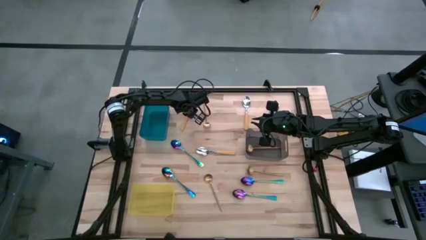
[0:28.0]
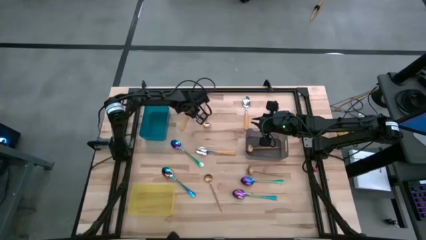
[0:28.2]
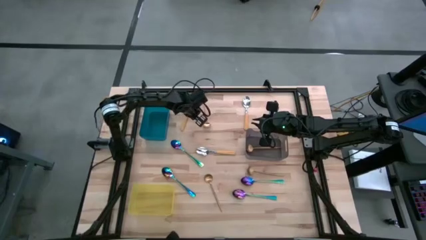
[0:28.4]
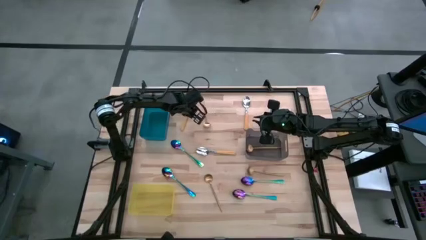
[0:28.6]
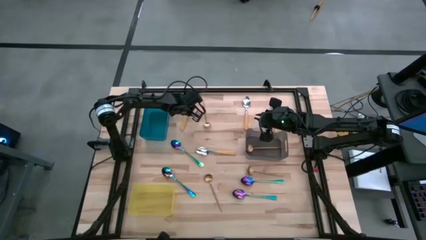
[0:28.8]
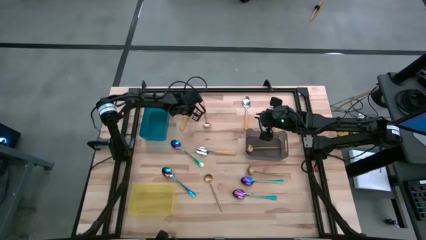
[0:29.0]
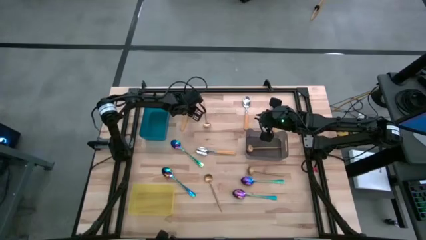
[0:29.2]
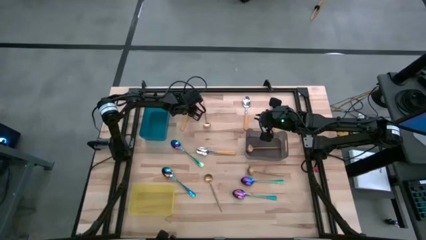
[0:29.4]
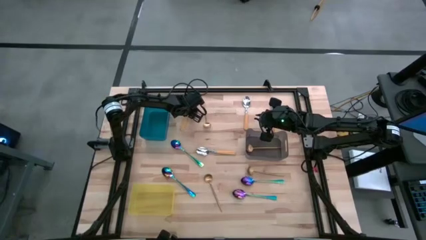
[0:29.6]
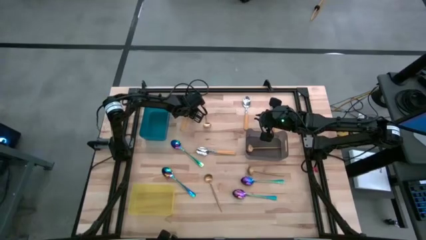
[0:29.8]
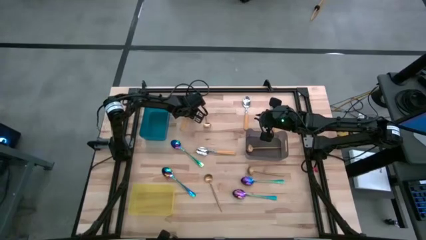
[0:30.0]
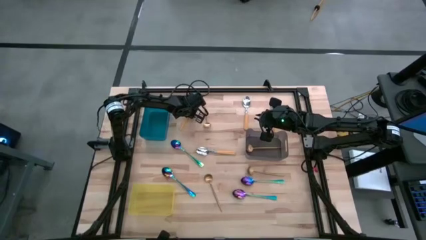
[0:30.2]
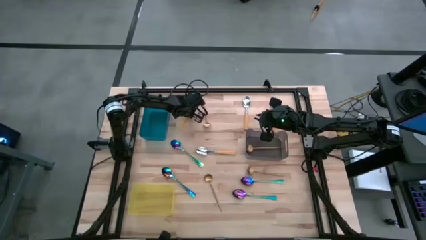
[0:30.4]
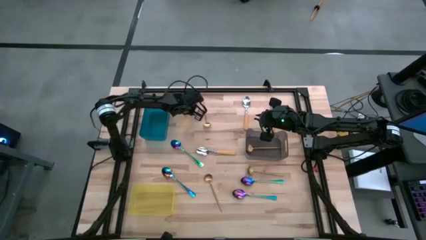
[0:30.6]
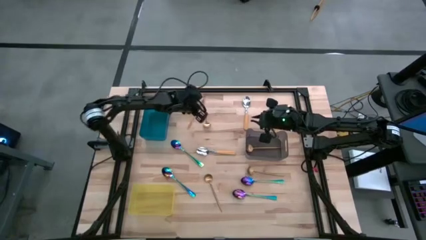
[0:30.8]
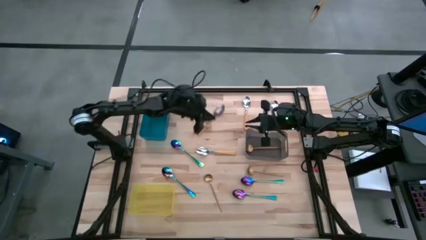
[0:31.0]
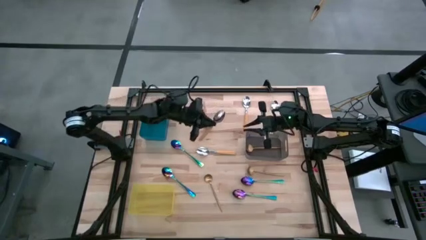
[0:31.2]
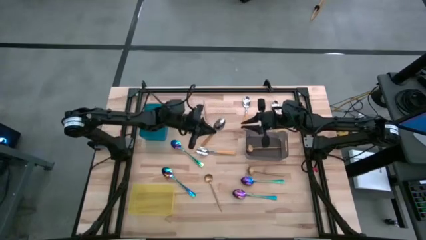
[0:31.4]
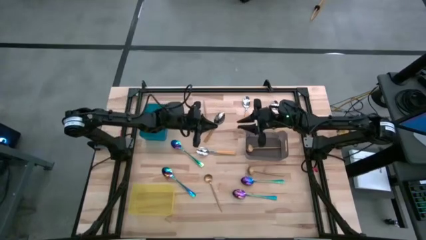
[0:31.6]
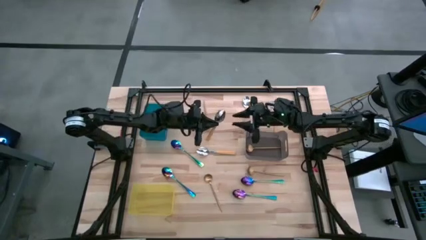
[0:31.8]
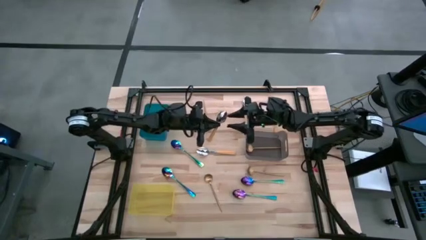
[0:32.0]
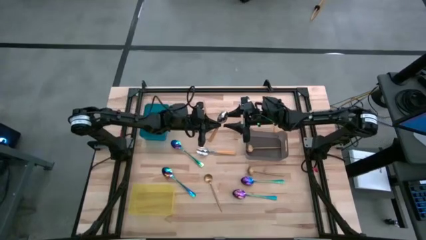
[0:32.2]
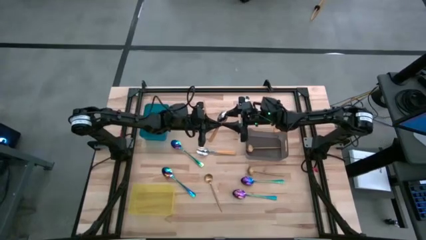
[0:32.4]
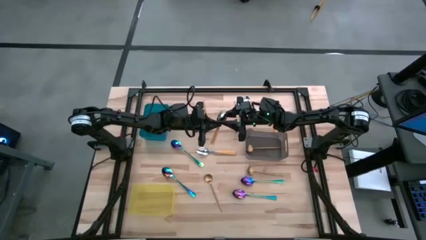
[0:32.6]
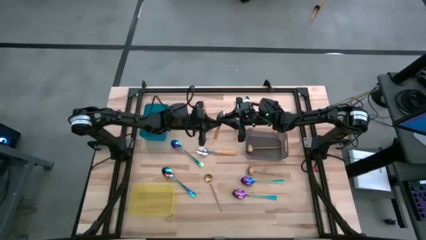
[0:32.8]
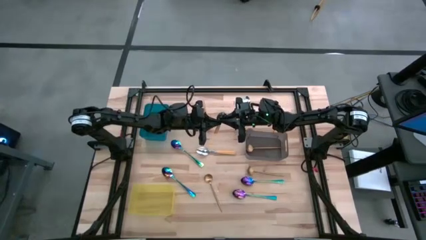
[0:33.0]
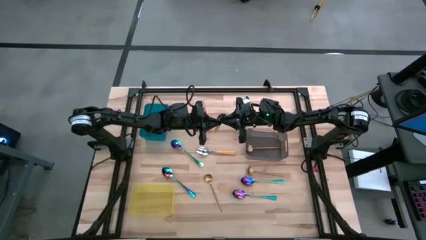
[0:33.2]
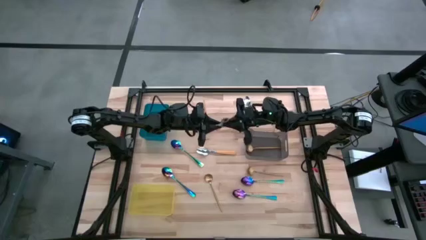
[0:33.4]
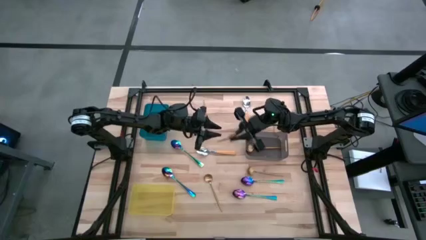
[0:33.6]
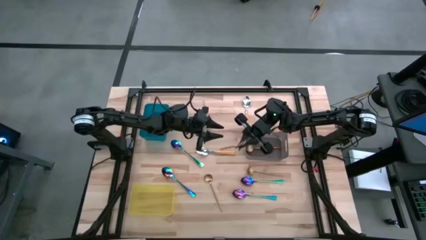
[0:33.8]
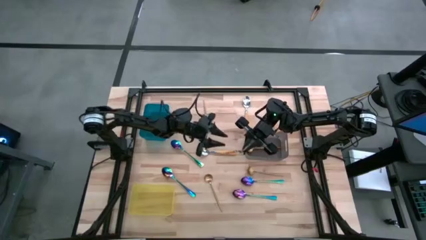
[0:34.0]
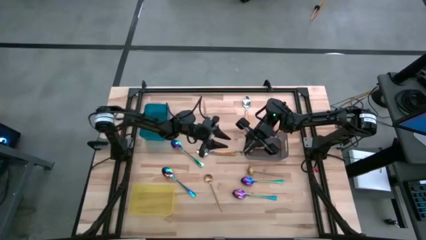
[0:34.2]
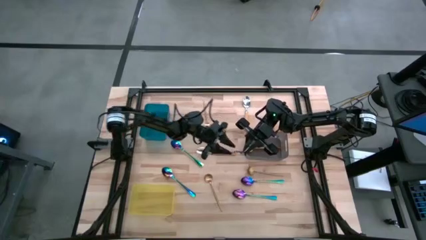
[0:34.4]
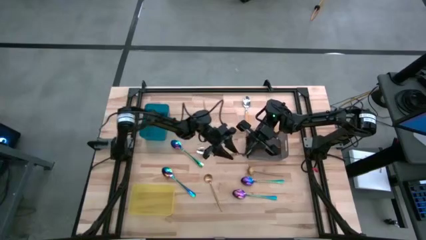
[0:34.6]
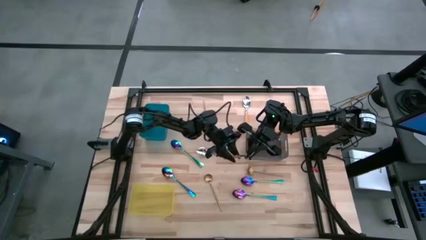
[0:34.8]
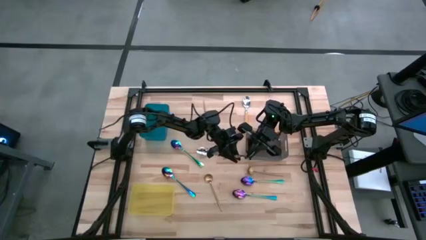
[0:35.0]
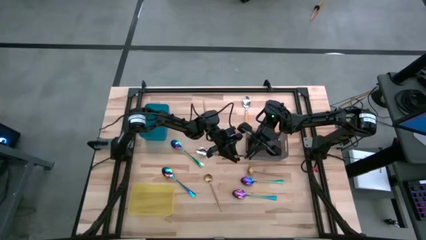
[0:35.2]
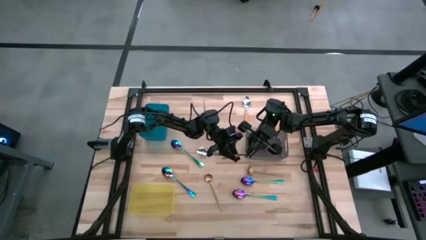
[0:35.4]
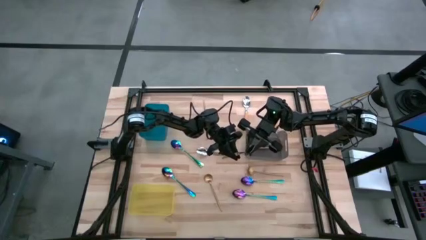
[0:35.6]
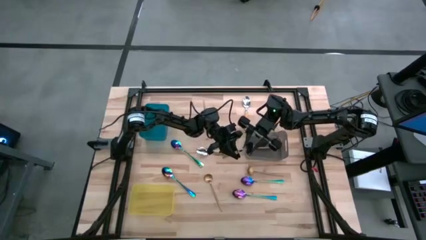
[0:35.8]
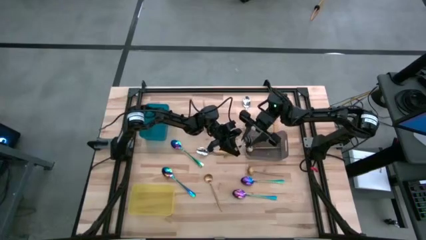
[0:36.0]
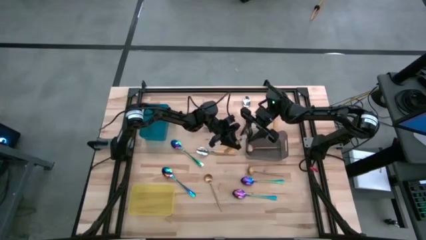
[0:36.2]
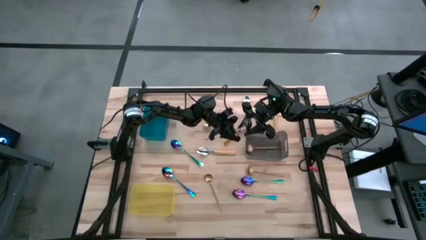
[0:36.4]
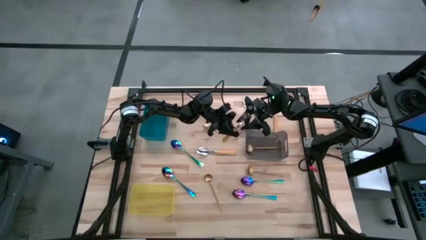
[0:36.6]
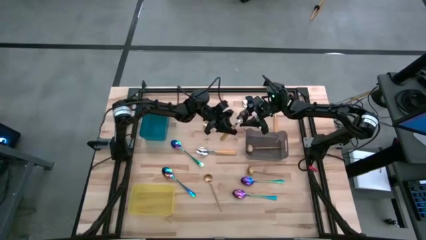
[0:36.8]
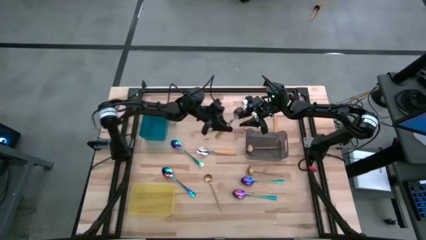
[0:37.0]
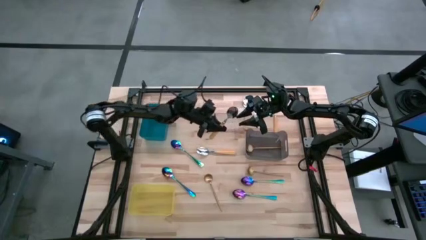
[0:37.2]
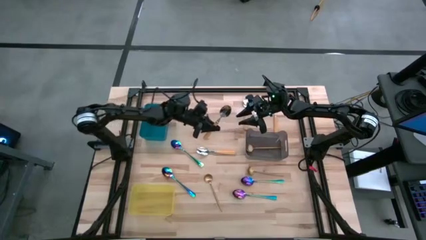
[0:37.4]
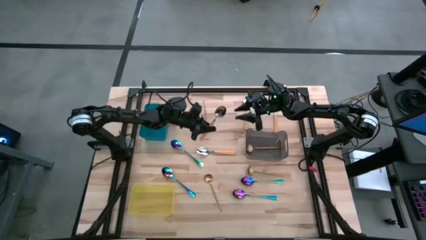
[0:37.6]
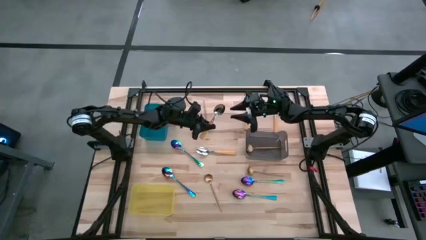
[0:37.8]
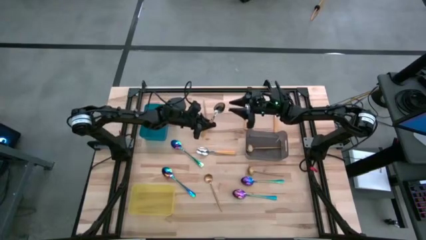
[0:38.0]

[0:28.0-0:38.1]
Task: Sort silverware by color (type)
Put the yellow spoon into the yellow bin

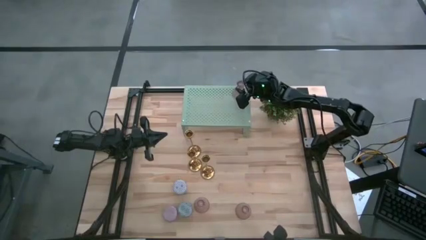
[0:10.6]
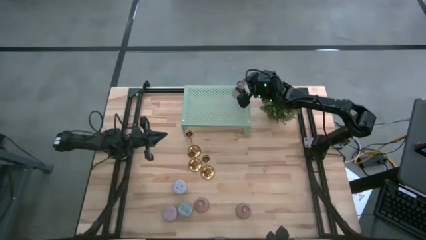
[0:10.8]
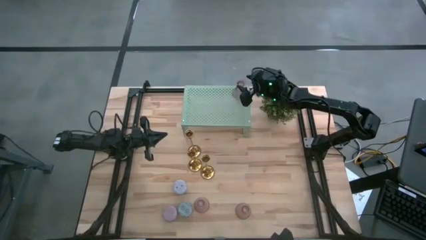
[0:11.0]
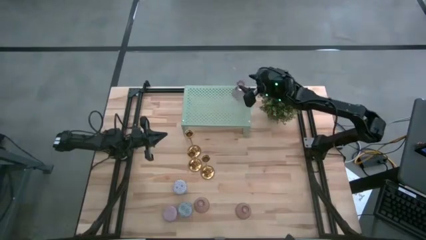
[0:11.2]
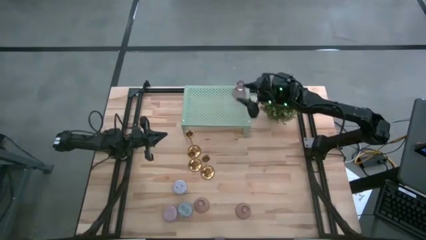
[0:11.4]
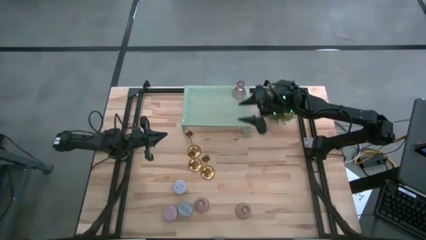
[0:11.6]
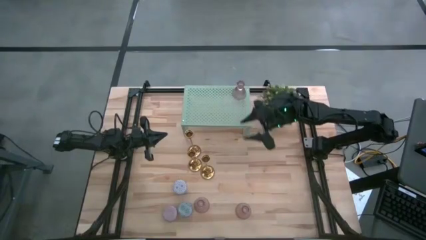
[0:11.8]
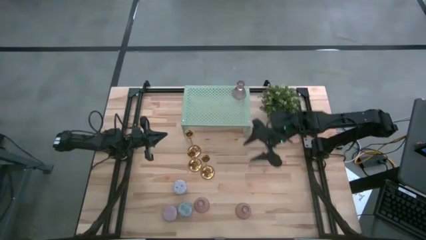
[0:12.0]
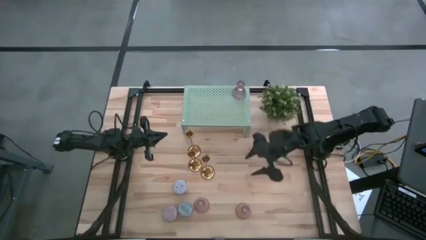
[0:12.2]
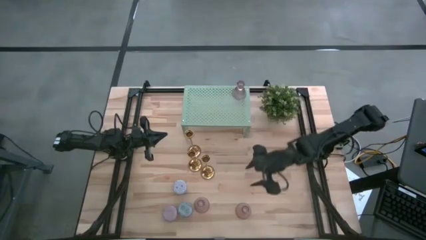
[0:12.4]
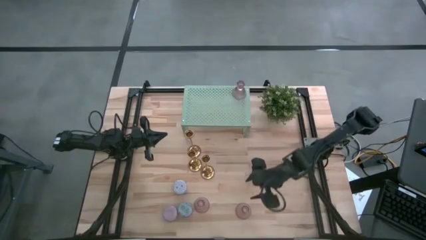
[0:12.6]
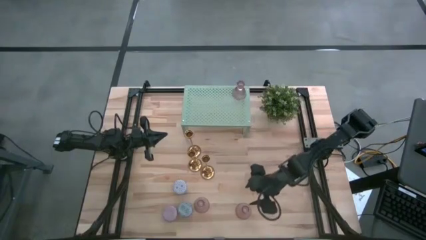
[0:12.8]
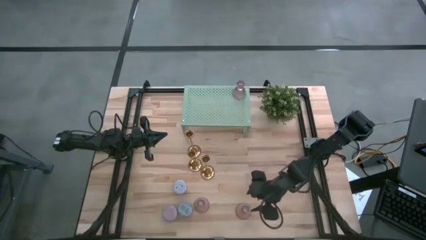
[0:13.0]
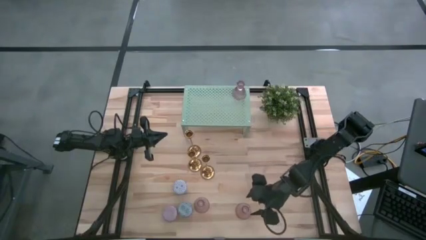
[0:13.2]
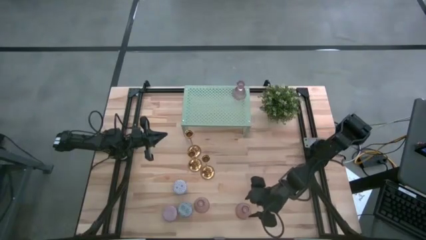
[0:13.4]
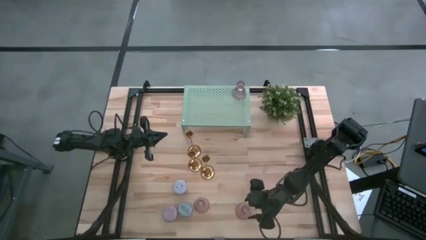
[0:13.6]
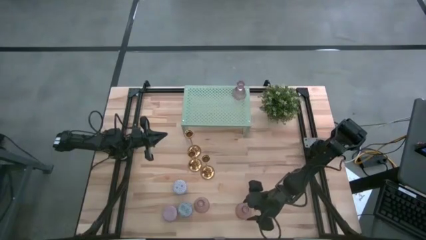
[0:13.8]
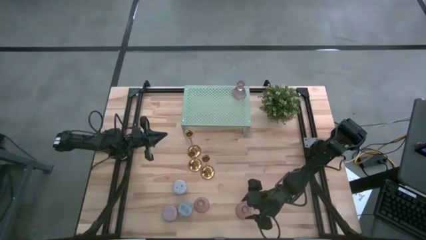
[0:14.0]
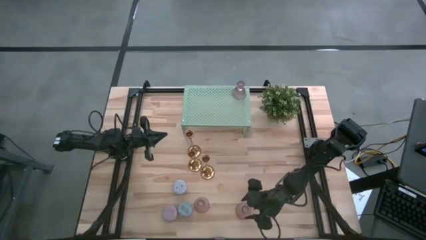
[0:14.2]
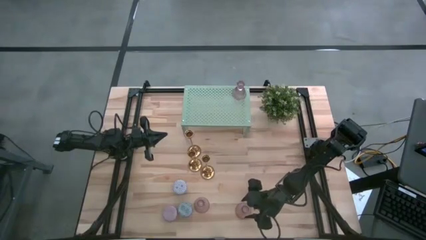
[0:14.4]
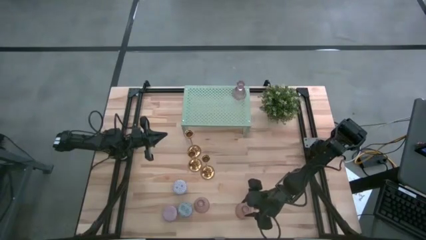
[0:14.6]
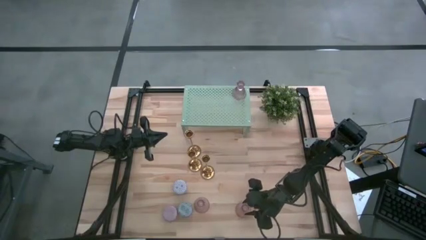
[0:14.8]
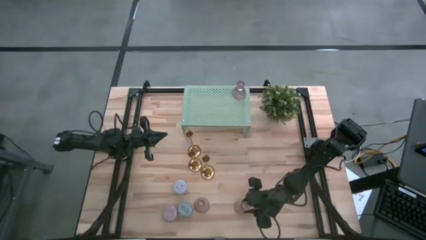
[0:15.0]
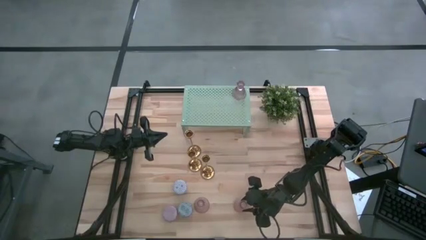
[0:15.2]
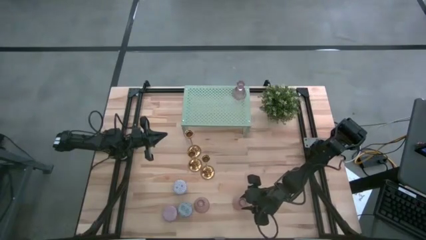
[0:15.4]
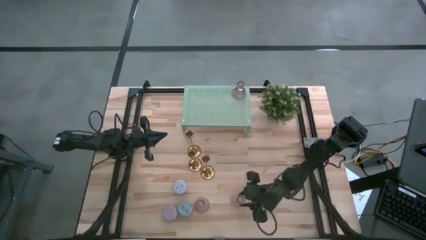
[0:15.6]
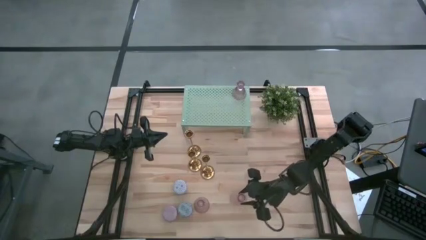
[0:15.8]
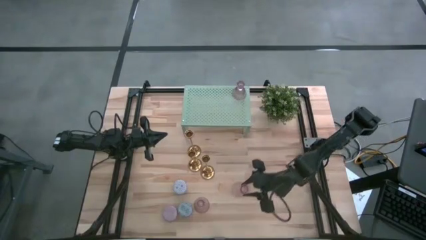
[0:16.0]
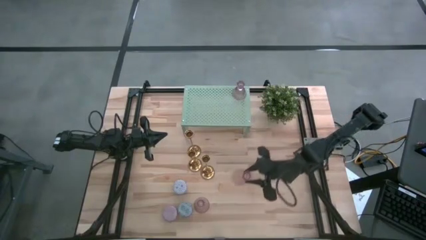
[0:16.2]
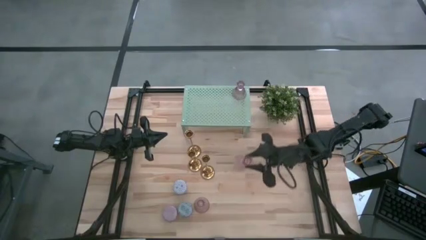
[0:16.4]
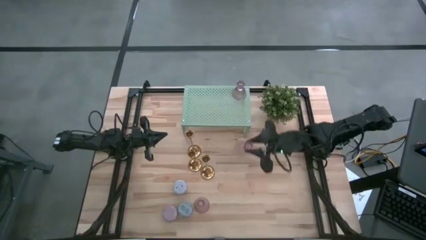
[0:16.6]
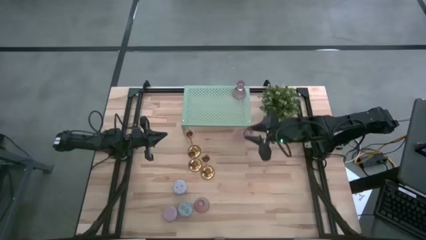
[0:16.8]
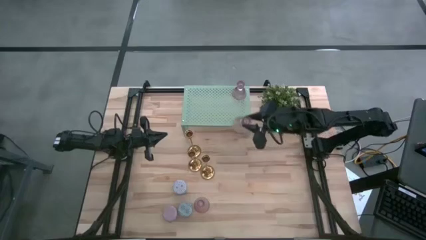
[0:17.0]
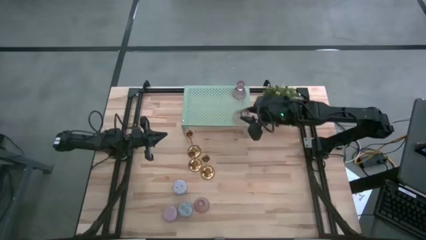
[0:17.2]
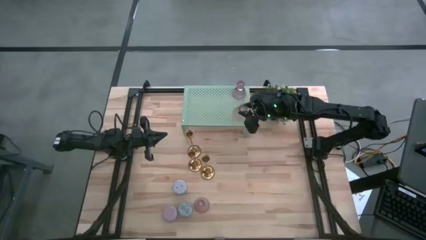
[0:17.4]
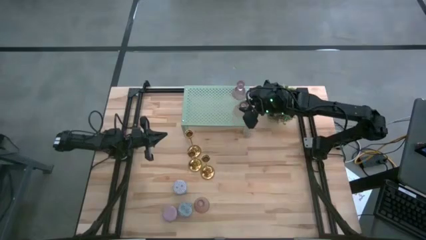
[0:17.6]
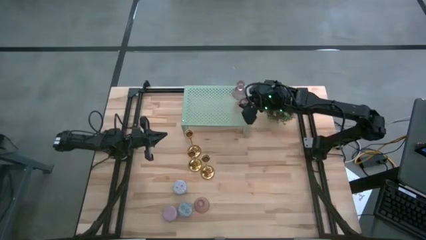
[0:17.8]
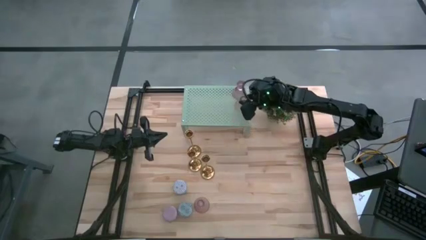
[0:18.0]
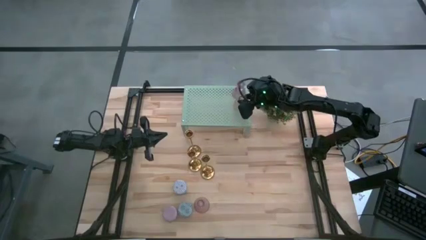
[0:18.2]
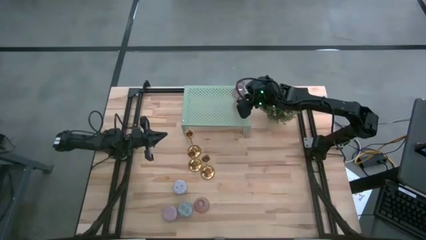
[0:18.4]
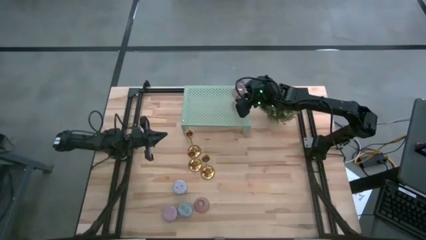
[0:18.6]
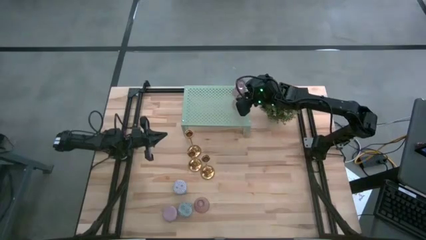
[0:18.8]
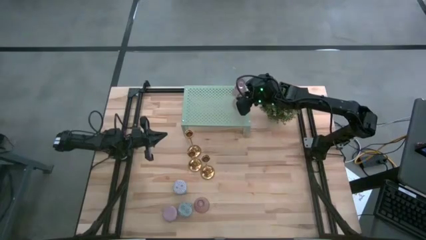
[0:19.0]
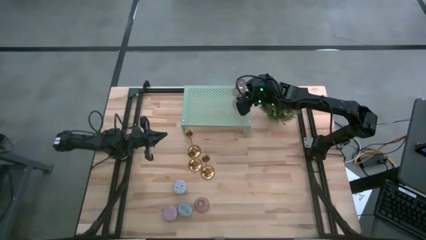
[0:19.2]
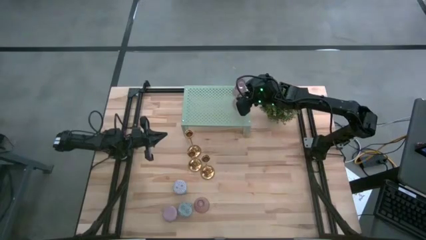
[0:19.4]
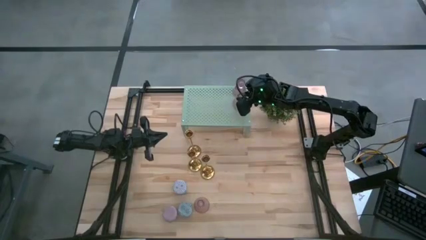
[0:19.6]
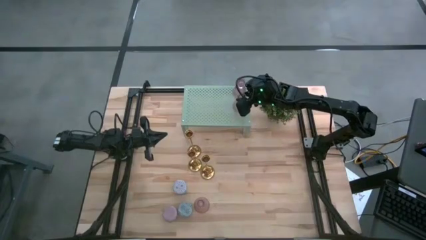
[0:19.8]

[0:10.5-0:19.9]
Task: Pick & Place candle stick holders
Put the right light purple glass candle holder on the shelf aligned with the other glass candle holder
